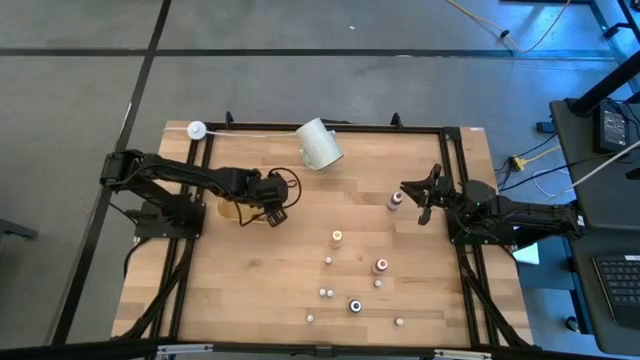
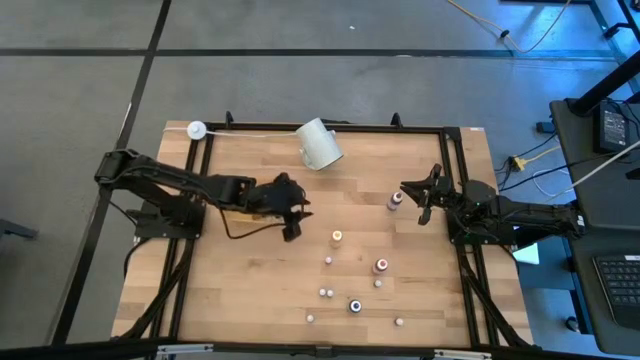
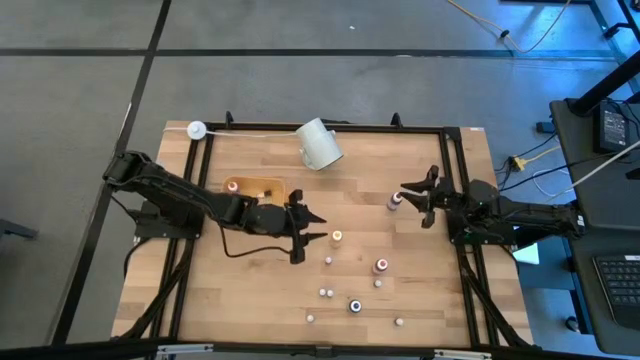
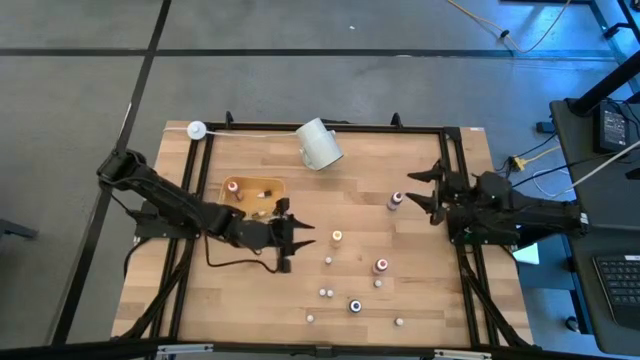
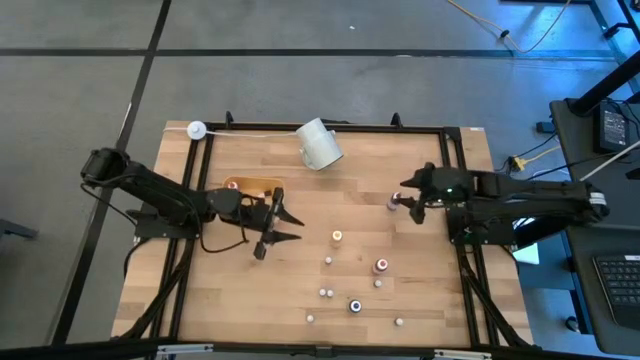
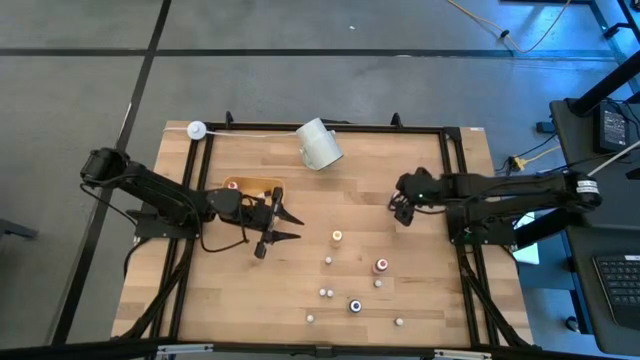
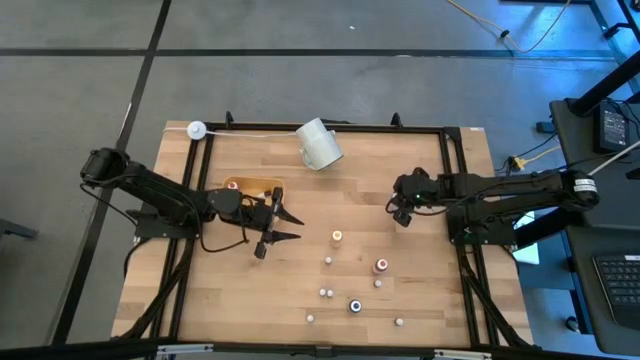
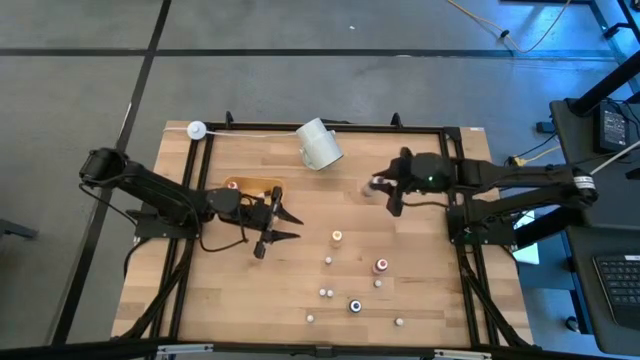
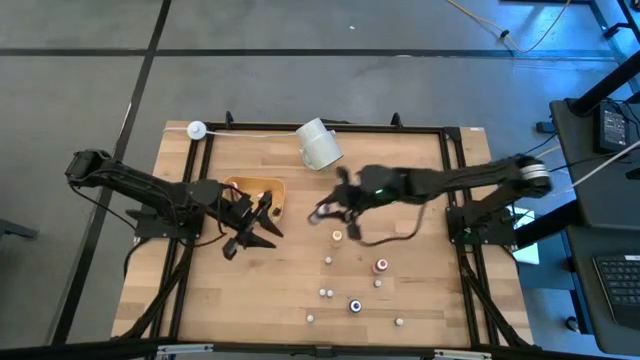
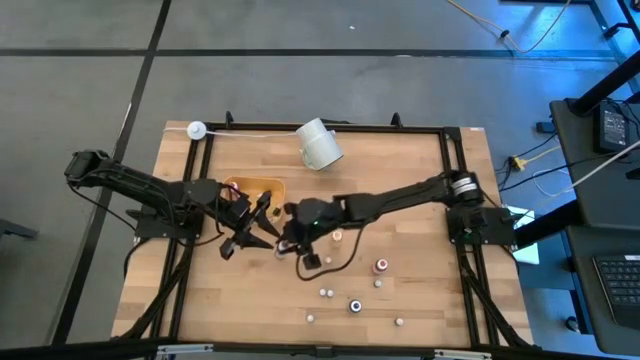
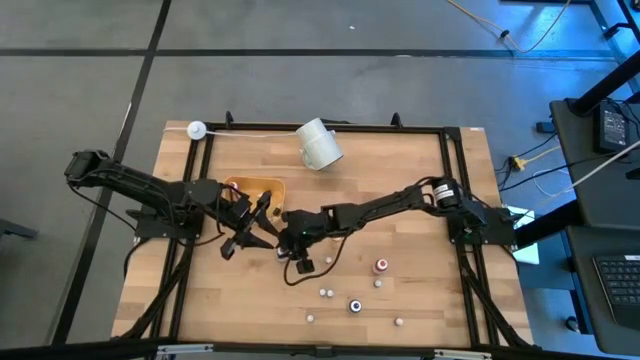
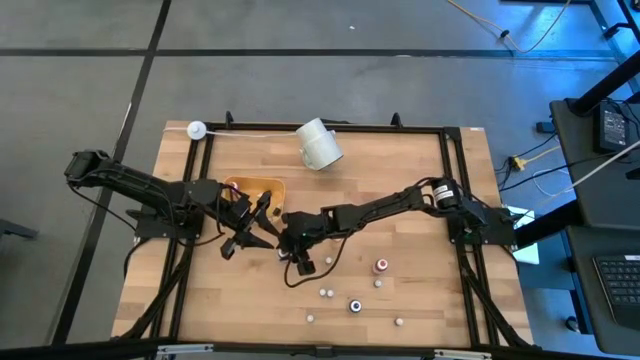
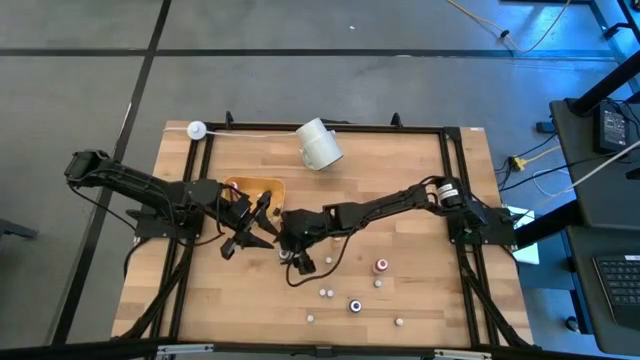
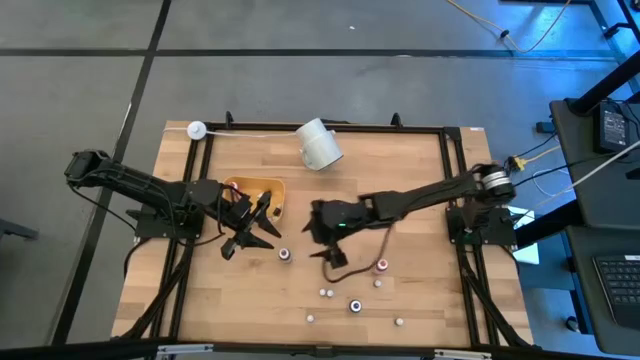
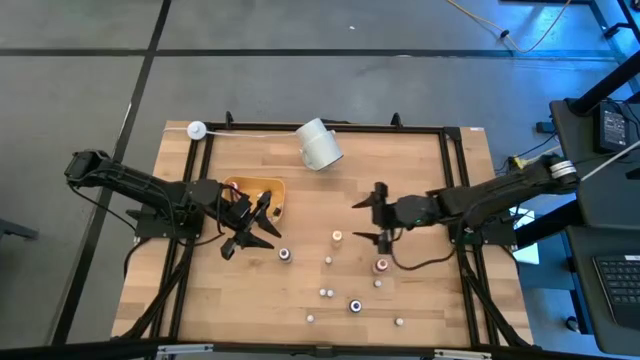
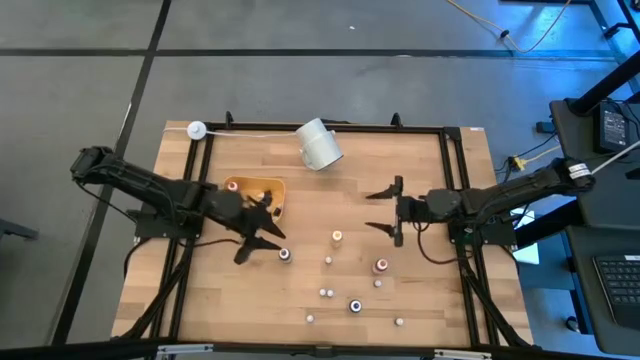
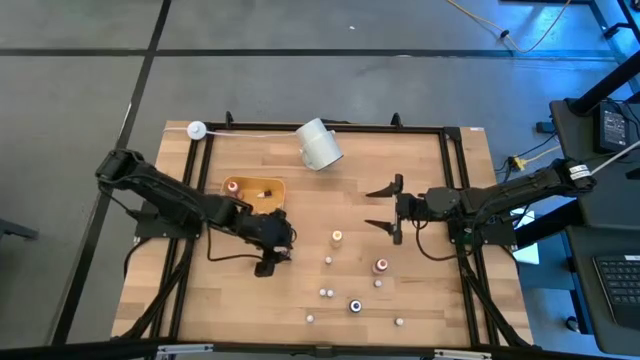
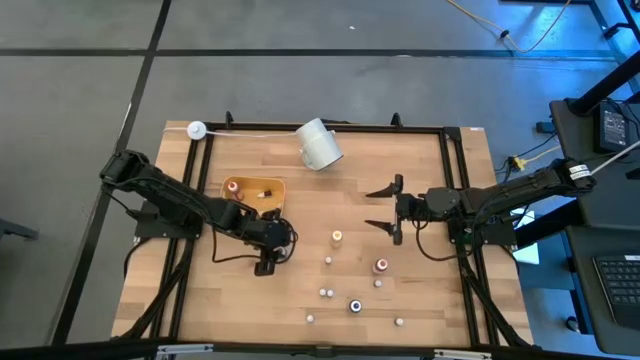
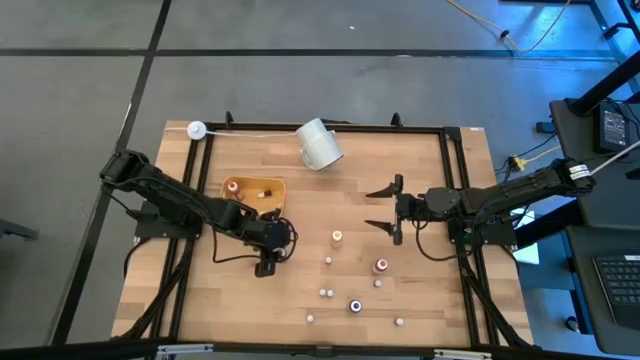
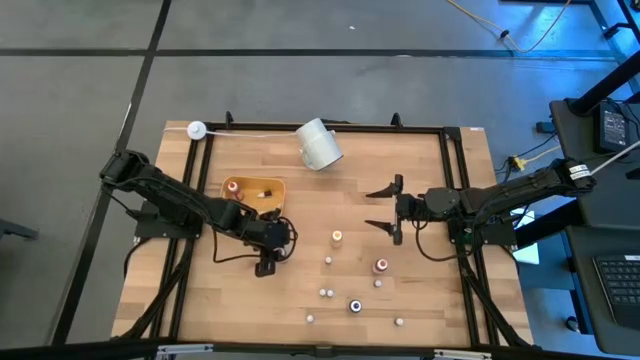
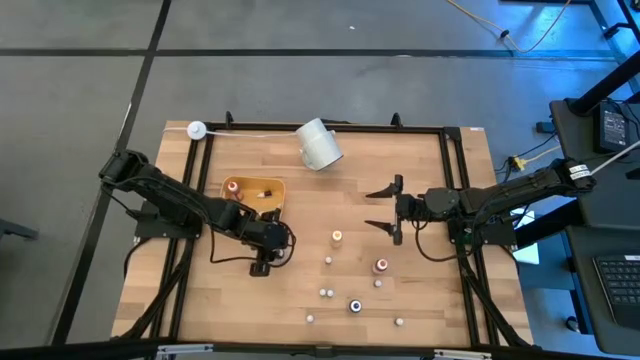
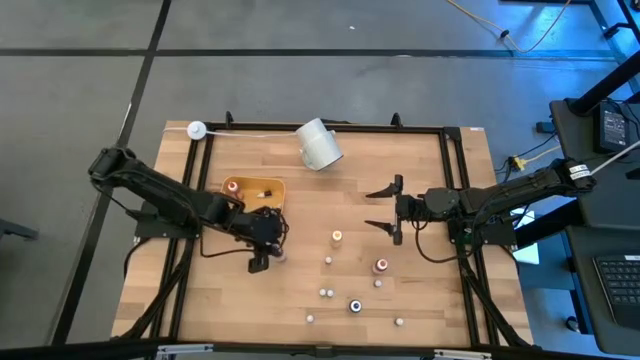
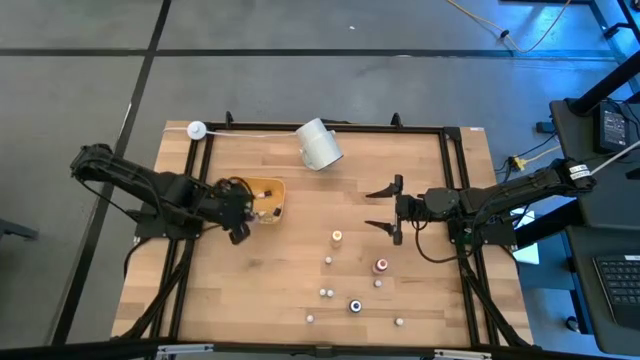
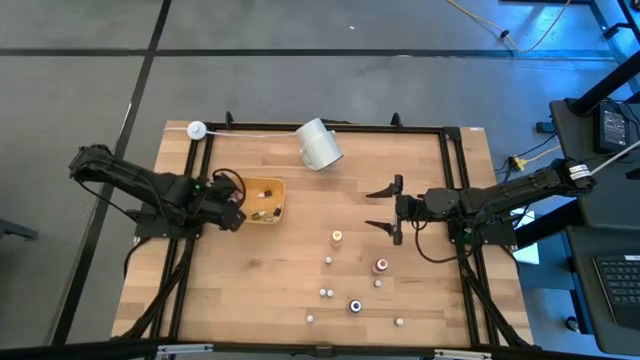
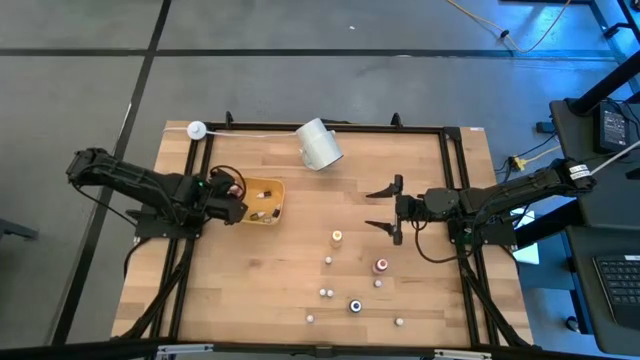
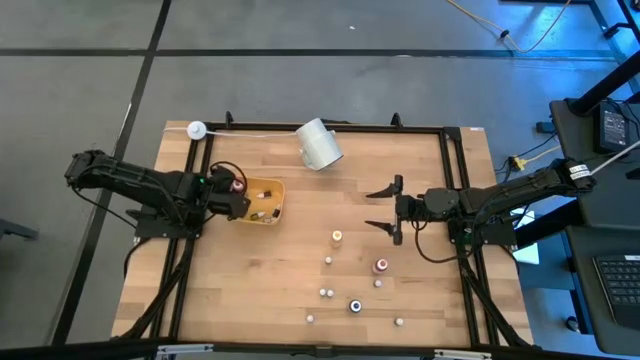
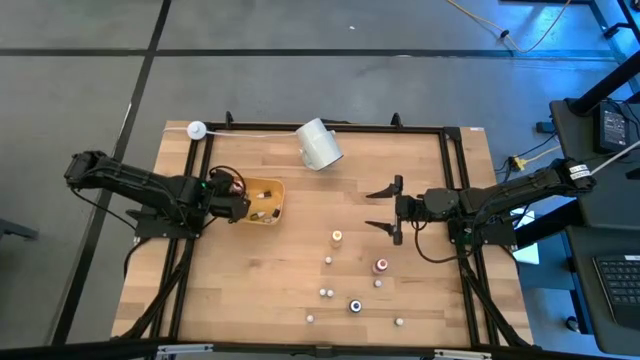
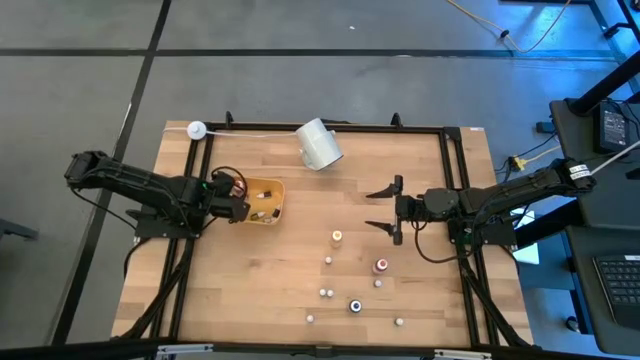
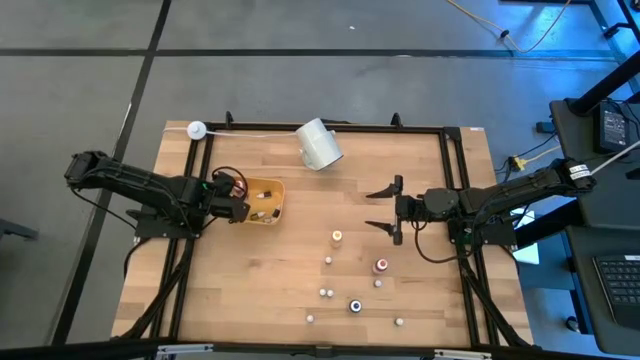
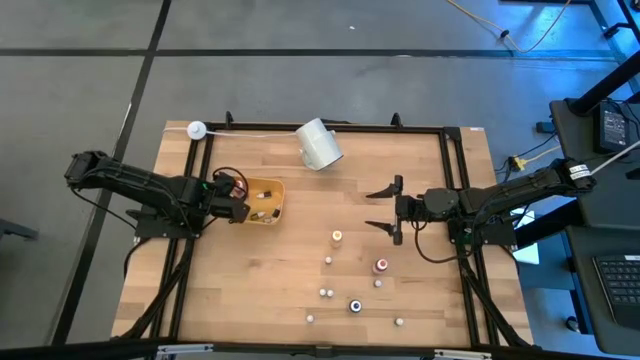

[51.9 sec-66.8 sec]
Task: Pick & Place food coloring
Put the large purple food coloring bottle into the bin

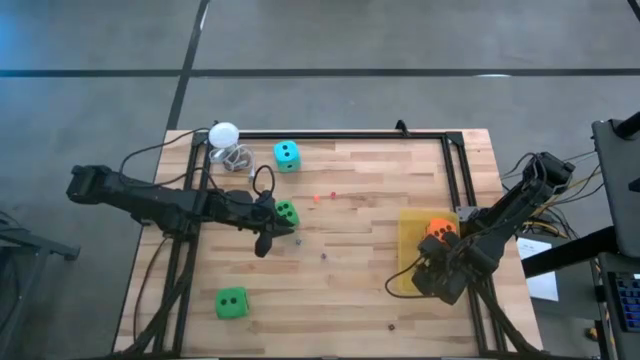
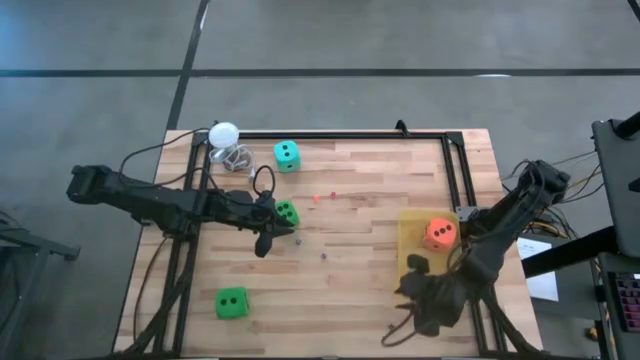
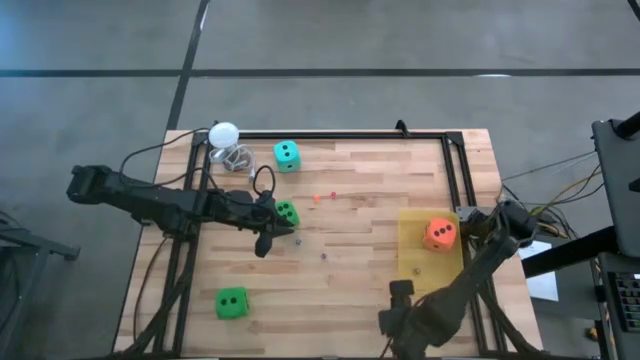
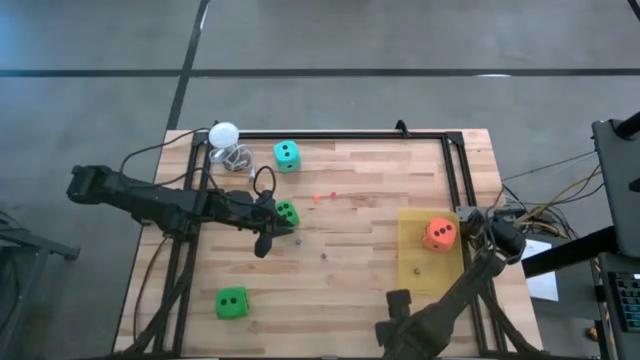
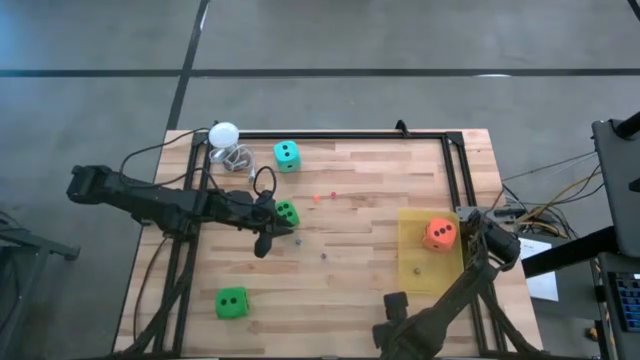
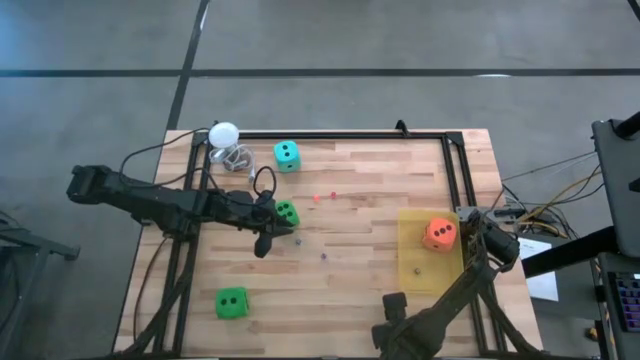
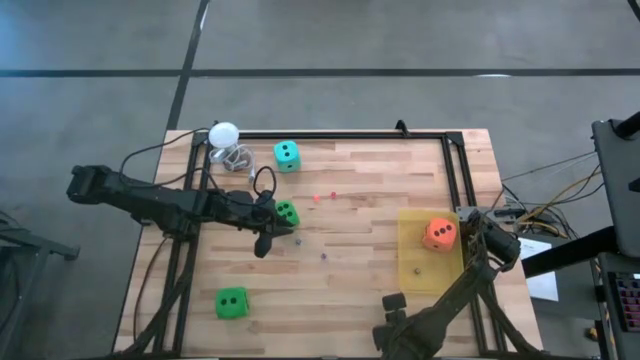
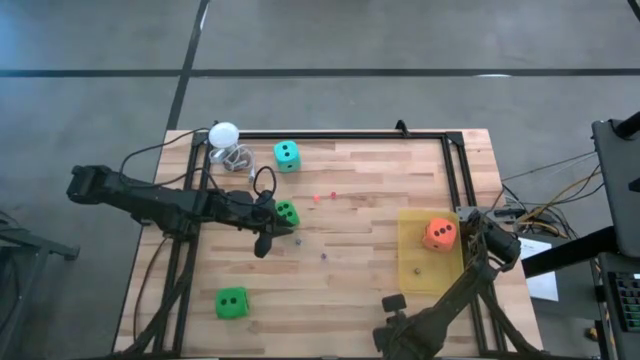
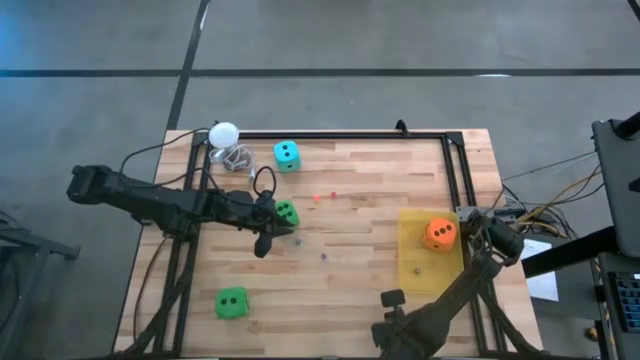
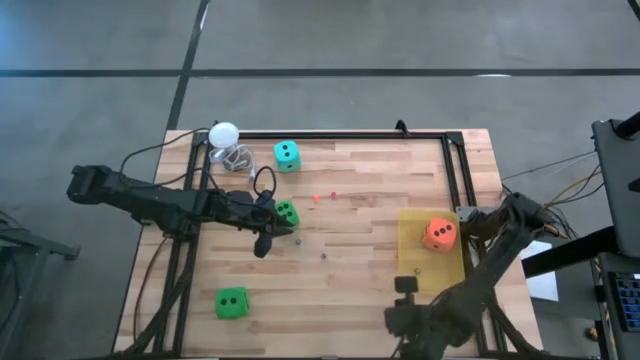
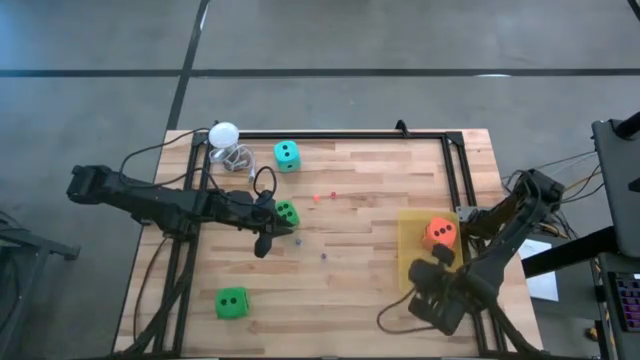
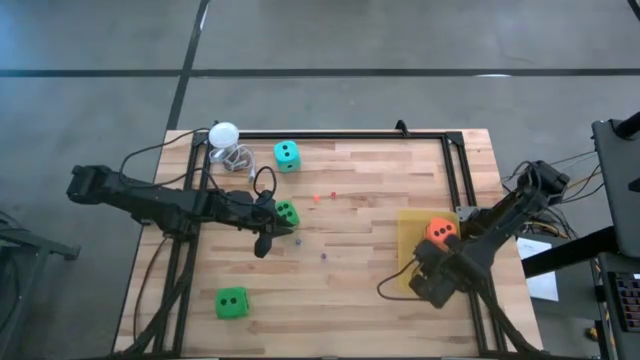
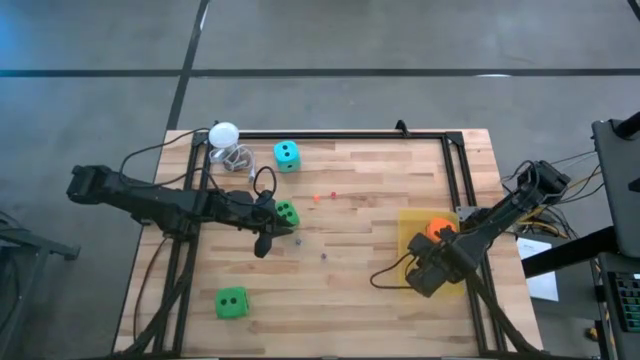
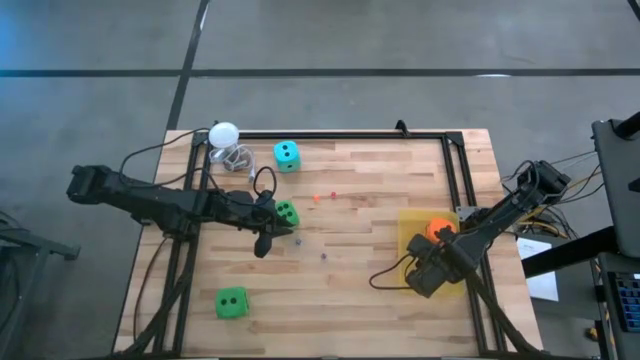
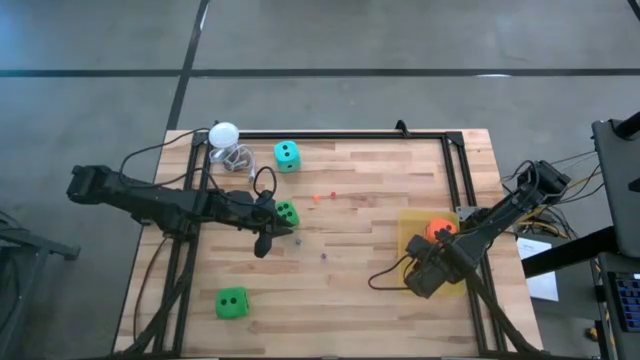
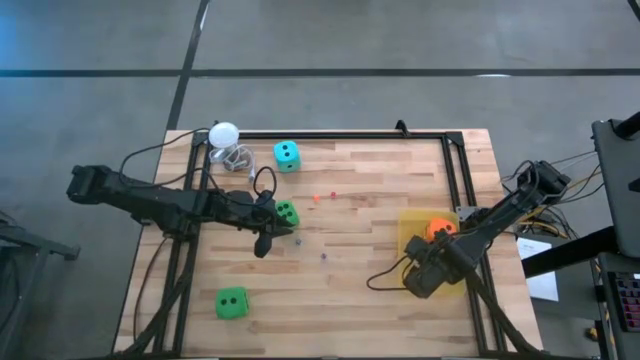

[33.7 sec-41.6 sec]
Task: Pick & Place Dice
Put the small black dice into the yellow bin
